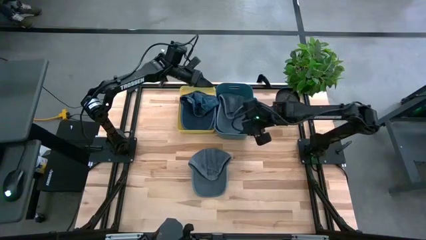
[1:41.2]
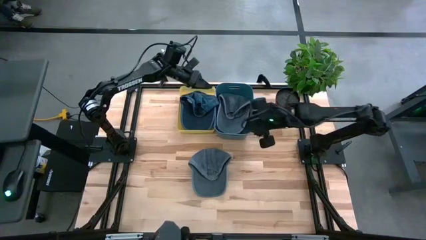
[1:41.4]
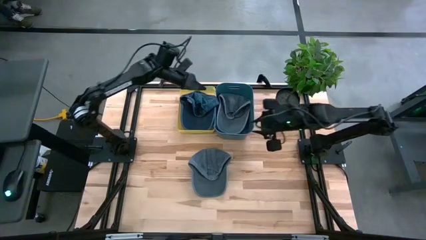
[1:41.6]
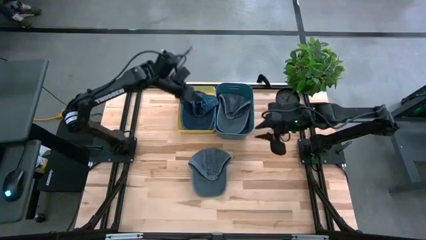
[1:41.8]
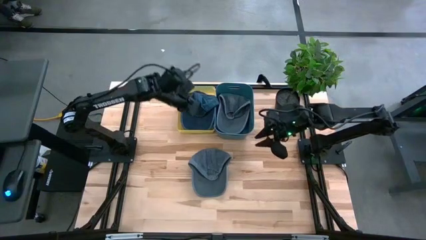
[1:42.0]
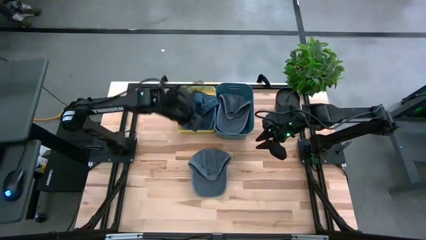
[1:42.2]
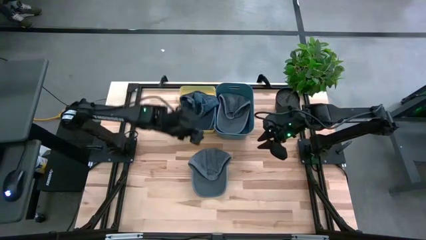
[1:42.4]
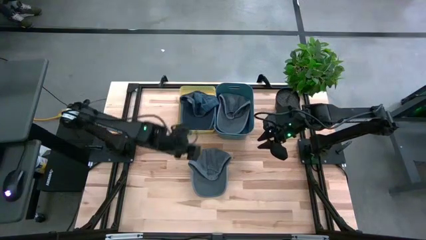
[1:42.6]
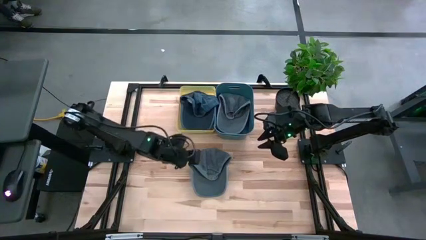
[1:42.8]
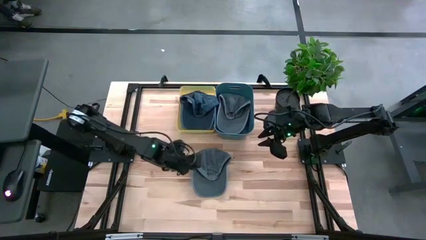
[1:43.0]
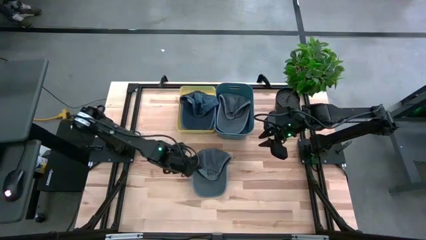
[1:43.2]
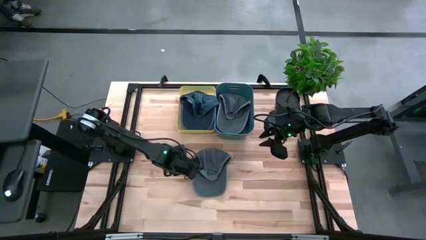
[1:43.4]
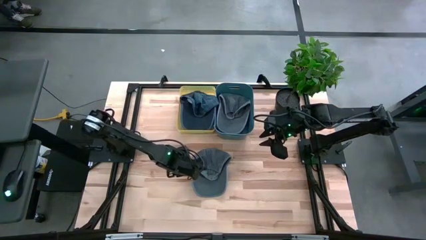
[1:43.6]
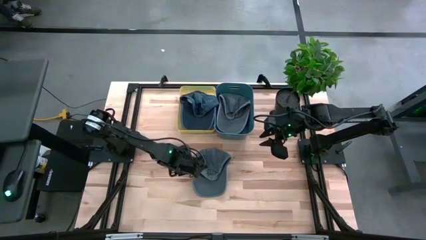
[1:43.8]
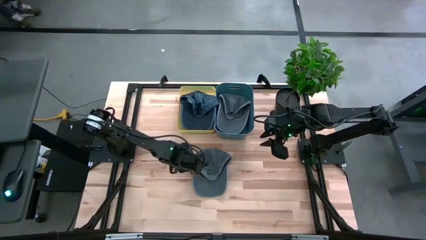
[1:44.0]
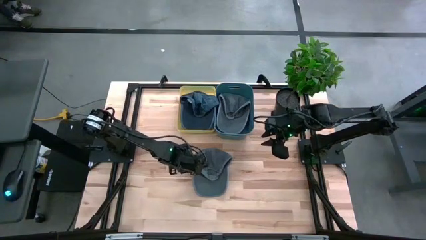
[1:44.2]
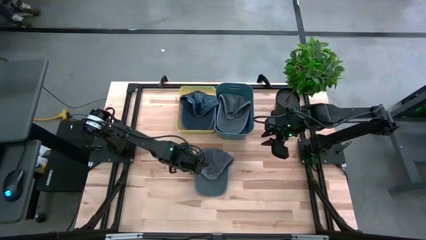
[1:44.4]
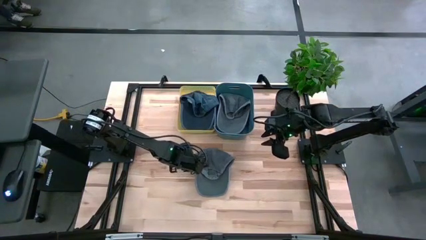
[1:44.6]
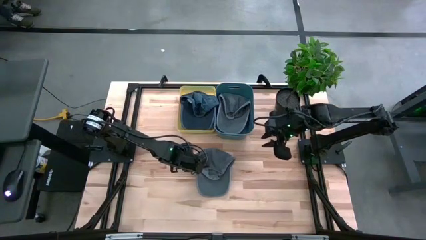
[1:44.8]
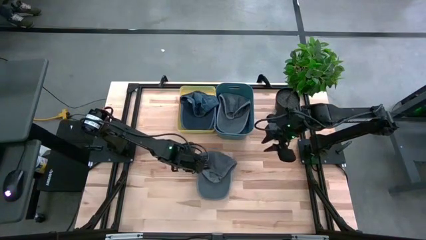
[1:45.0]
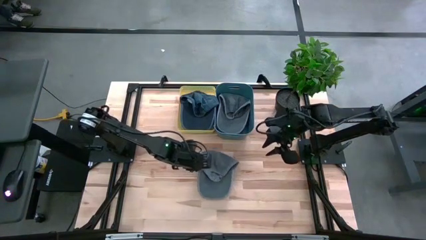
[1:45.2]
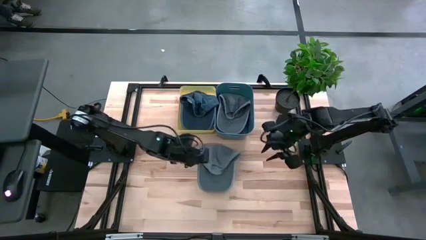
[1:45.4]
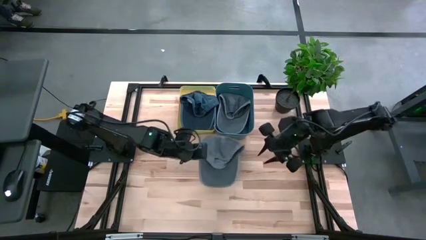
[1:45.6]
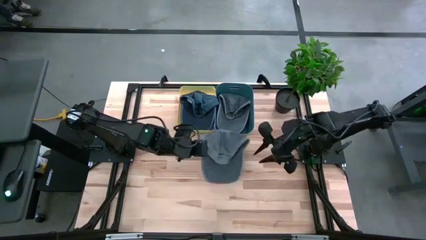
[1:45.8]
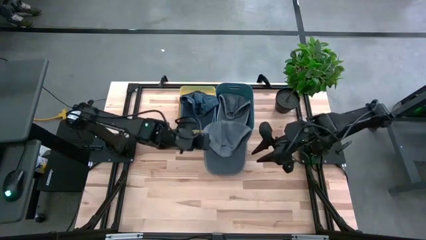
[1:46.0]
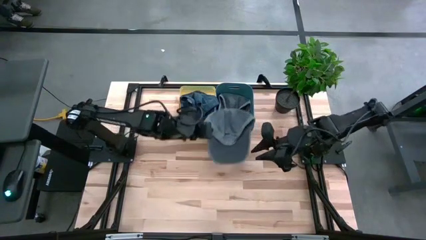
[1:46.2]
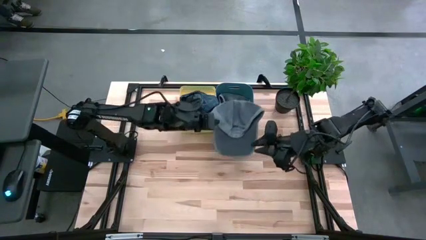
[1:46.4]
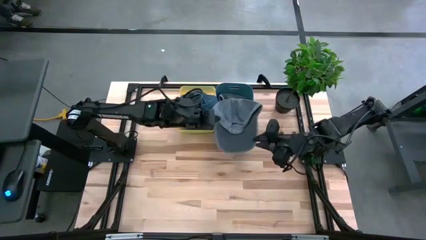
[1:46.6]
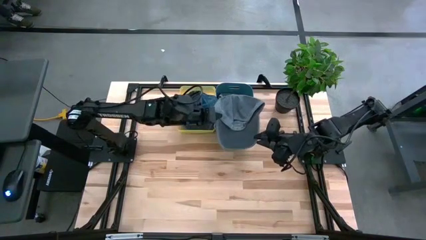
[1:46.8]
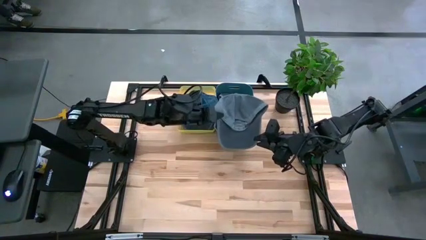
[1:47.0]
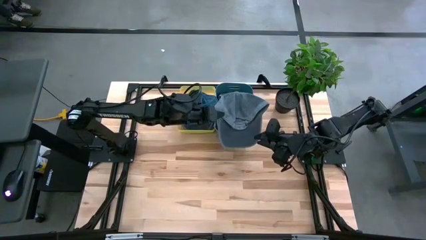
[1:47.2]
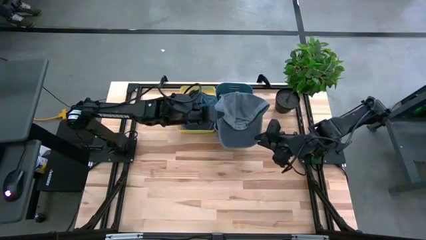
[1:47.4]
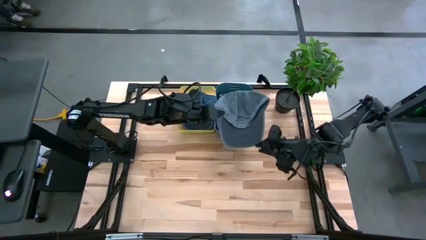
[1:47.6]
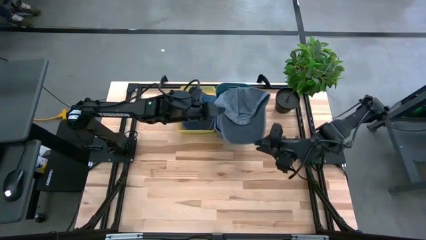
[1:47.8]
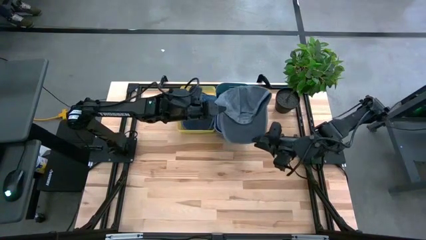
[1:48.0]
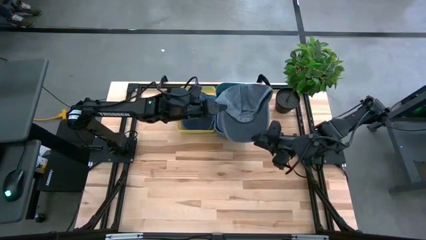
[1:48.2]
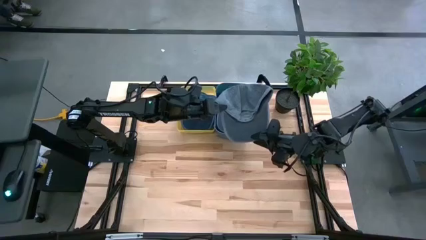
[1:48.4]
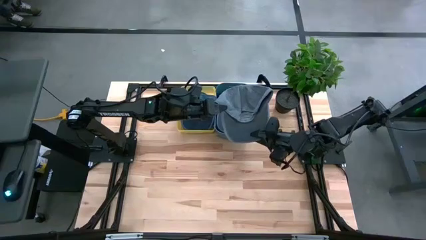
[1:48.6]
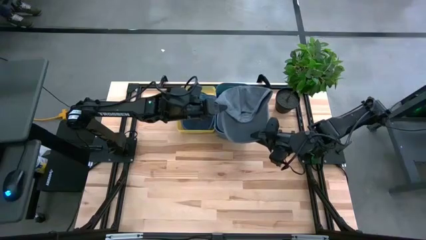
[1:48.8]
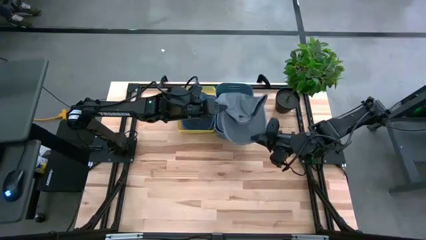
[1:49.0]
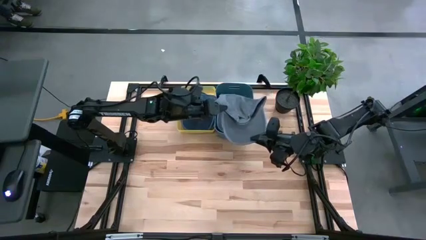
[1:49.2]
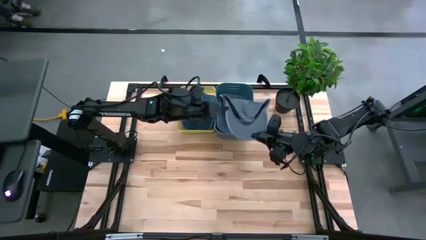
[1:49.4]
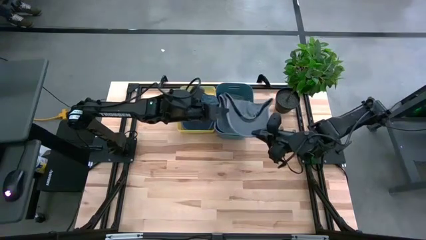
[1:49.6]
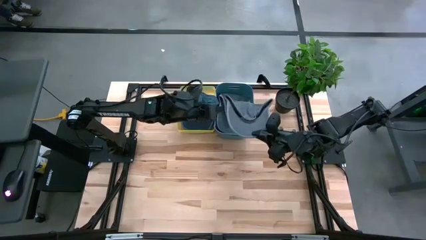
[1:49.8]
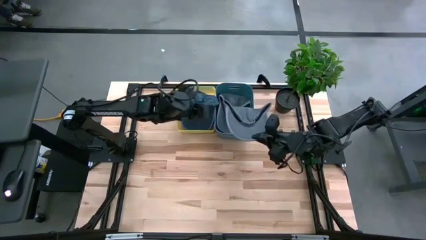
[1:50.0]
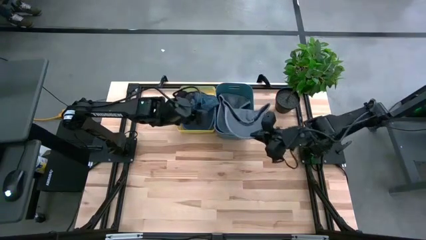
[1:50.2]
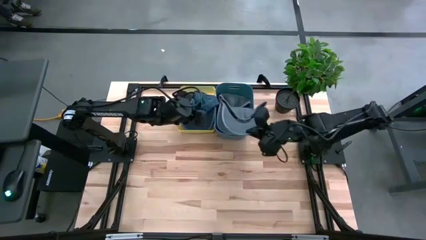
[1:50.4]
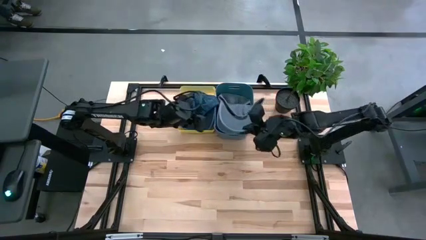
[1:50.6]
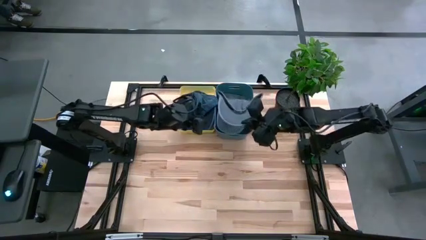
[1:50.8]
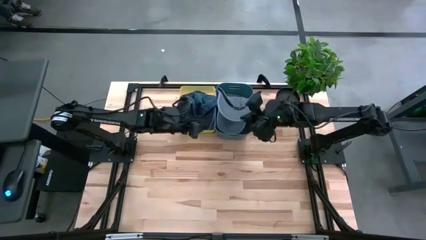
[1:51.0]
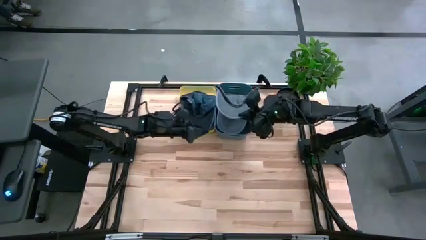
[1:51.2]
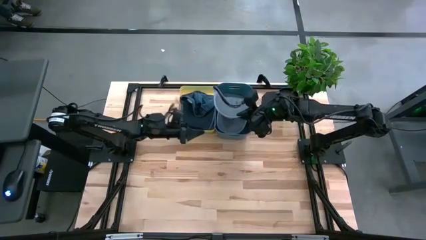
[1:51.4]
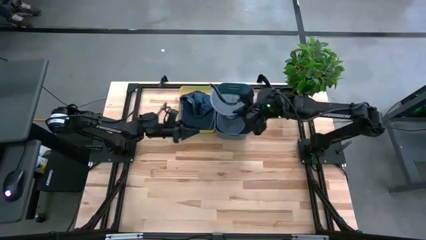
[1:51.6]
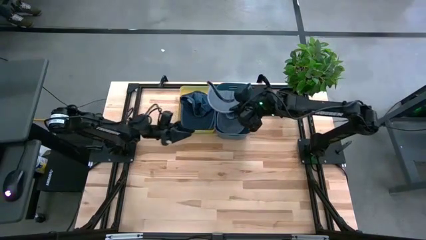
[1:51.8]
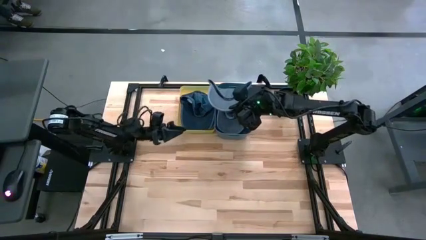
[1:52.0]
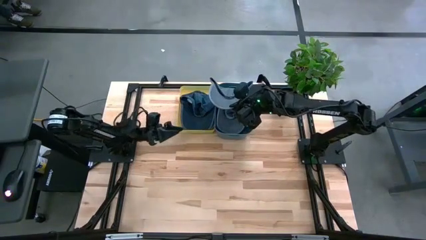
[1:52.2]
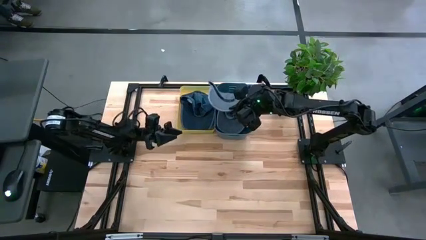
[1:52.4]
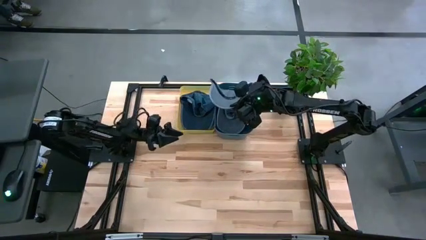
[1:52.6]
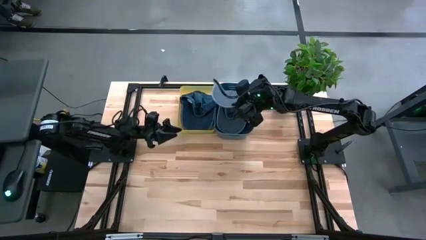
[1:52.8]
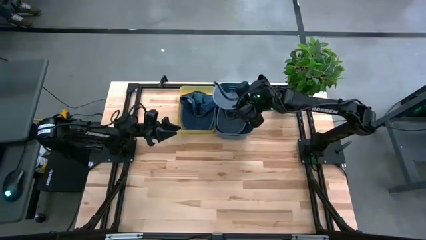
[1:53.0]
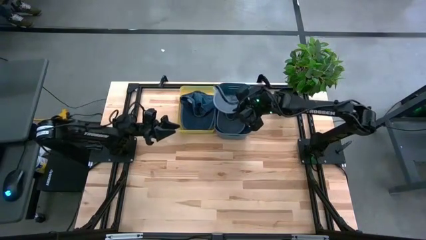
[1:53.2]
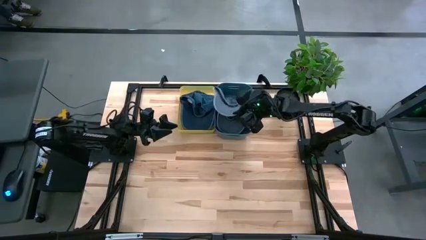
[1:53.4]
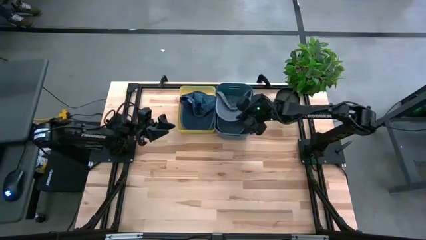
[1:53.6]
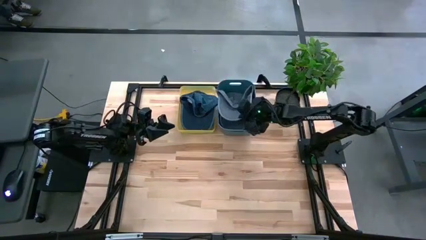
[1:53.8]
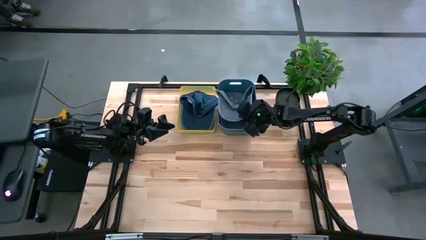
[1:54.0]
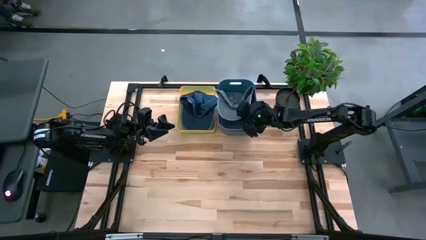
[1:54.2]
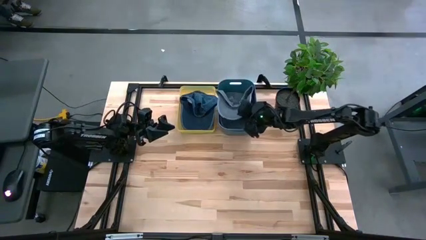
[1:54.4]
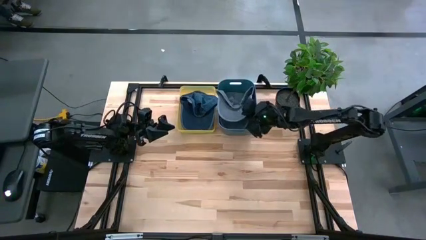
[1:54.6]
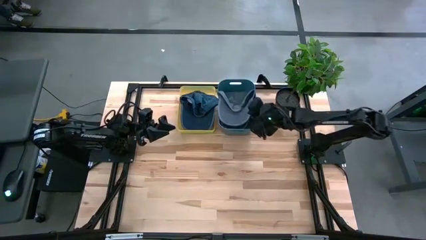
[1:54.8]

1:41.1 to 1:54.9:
Task: Pick & Place hat
Put the grey cap into the grey bin

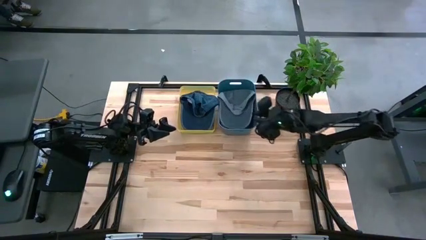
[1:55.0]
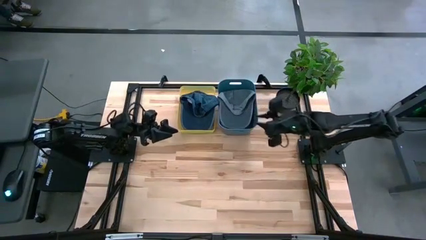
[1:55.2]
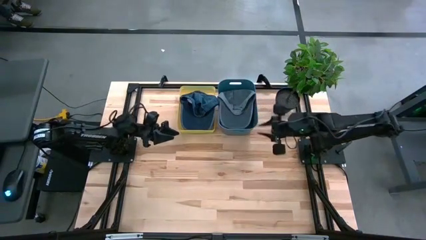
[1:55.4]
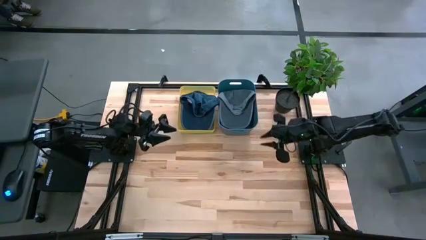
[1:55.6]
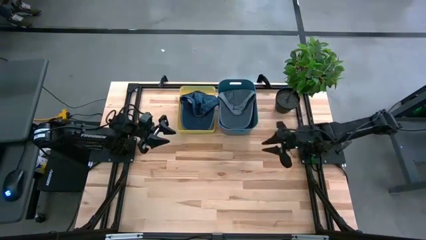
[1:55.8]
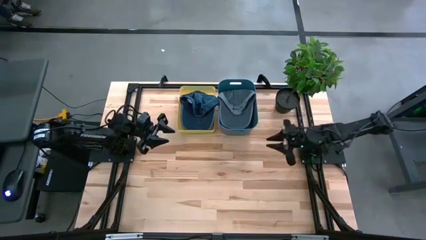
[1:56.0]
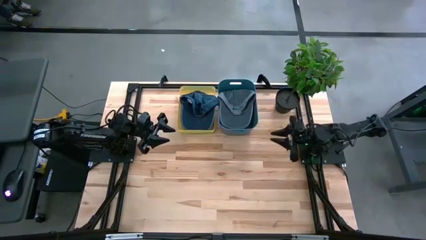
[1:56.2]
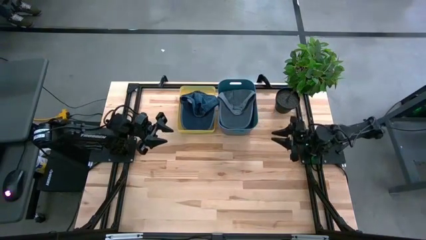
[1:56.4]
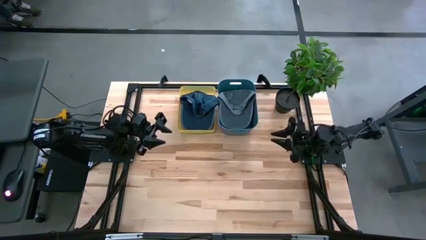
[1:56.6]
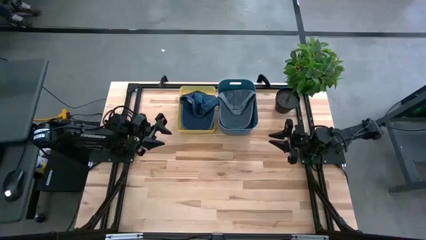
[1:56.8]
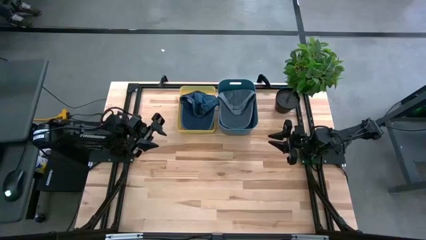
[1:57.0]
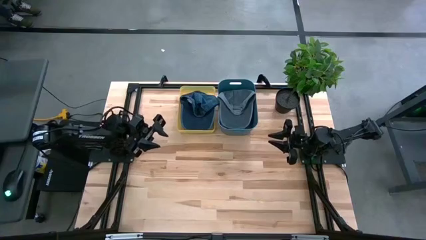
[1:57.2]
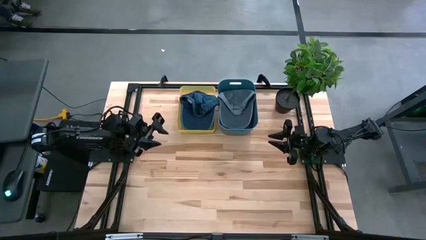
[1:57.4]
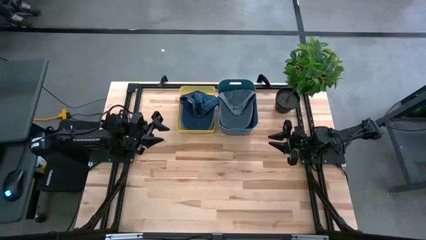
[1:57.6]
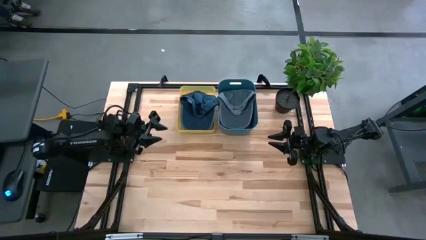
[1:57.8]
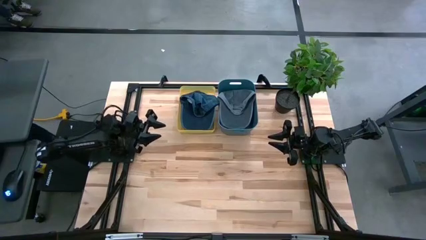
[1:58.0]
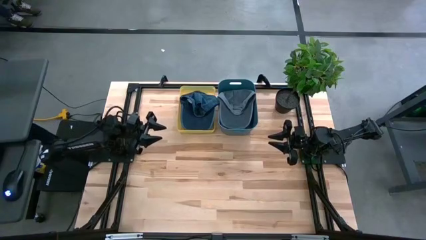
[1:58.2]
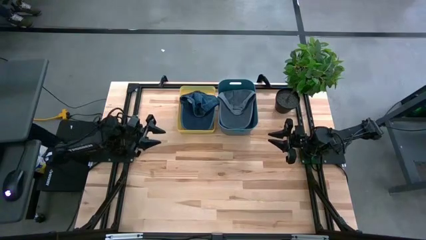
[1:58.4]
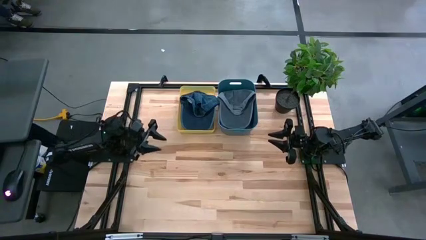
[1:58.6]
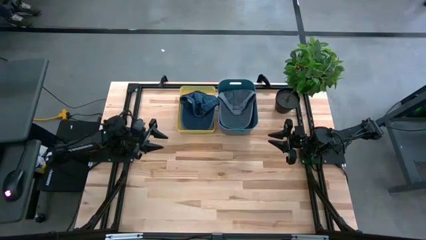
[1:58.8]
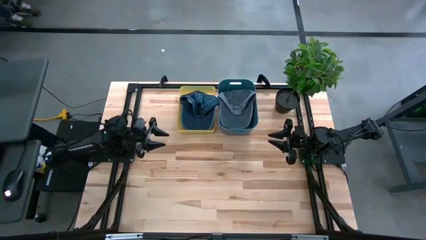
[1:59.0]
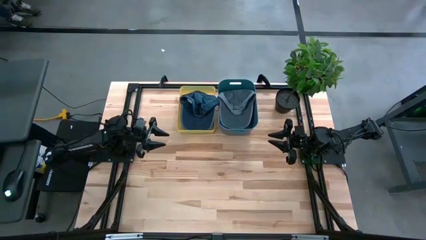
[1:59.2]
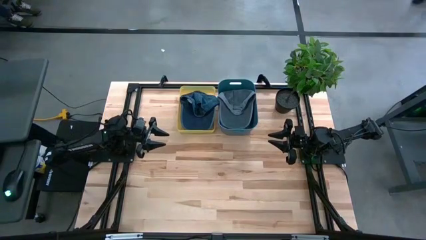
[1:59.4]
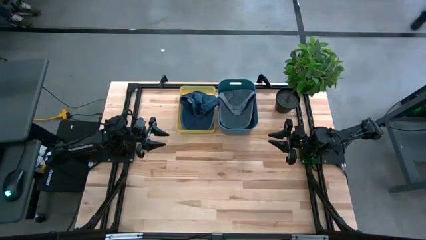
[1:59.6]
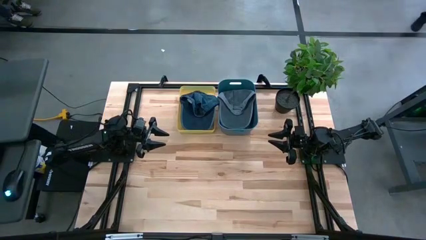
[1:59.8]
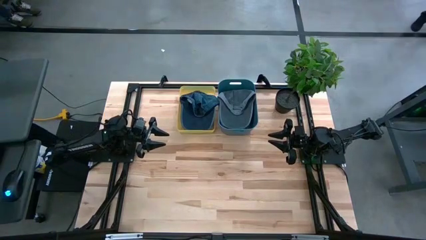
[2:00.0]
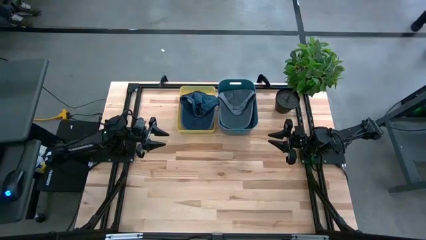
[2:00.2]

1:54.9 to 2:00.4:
Return to Home Position
